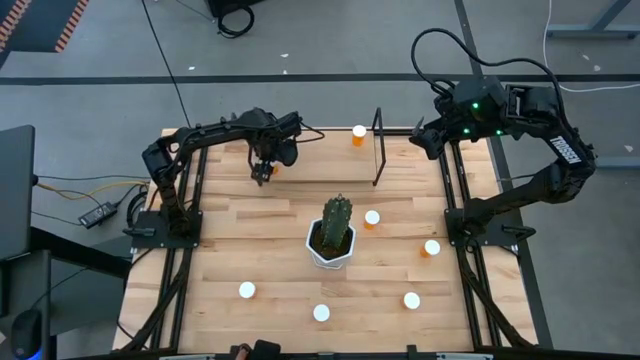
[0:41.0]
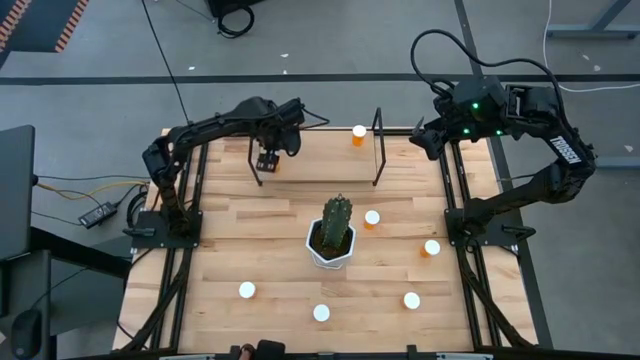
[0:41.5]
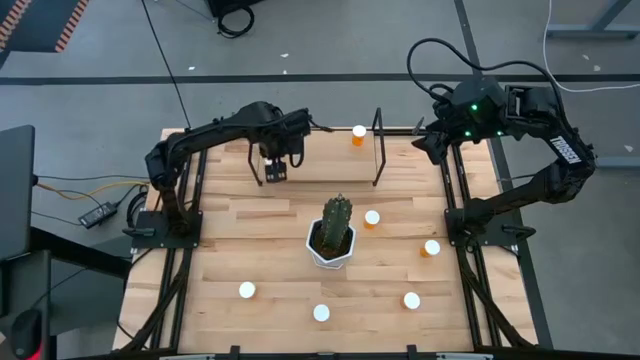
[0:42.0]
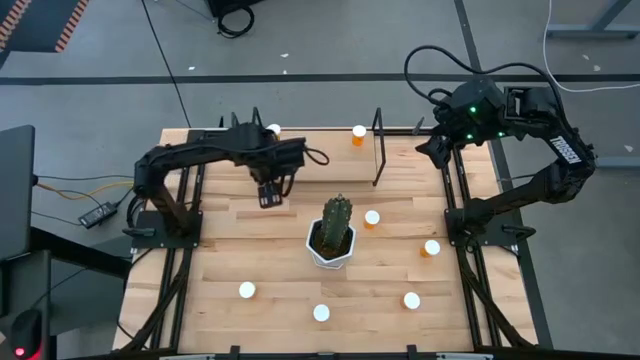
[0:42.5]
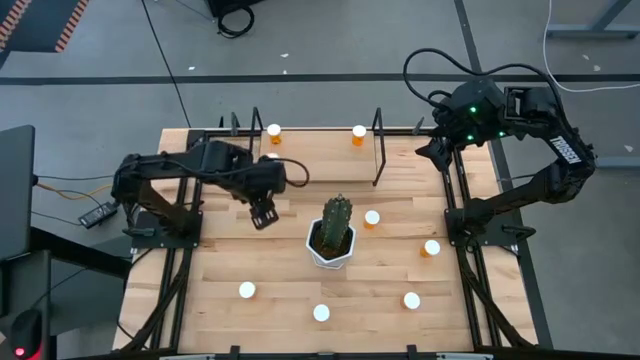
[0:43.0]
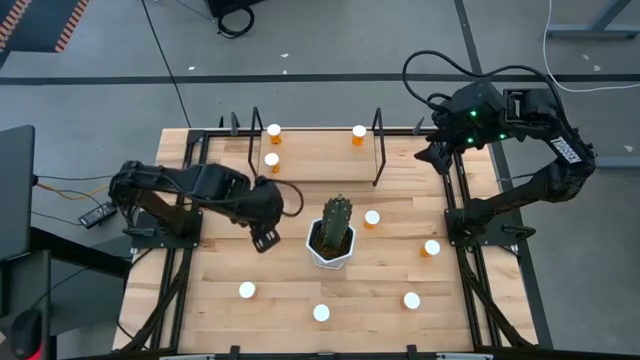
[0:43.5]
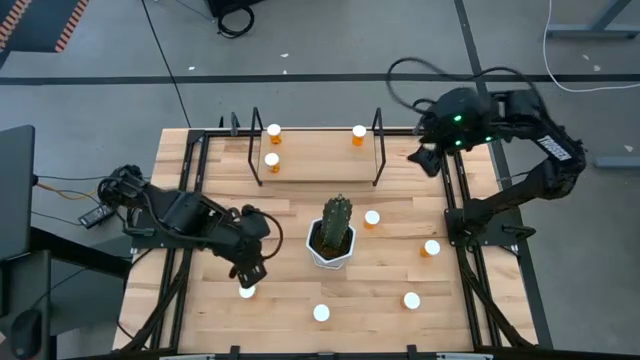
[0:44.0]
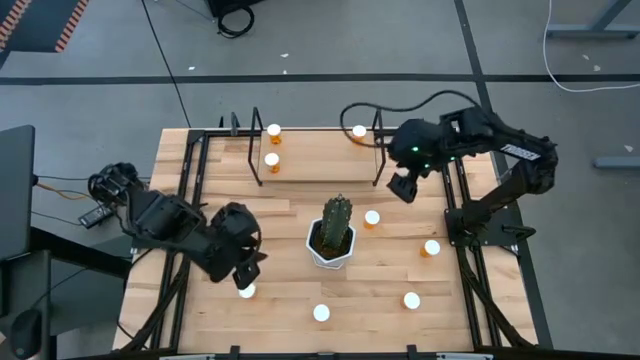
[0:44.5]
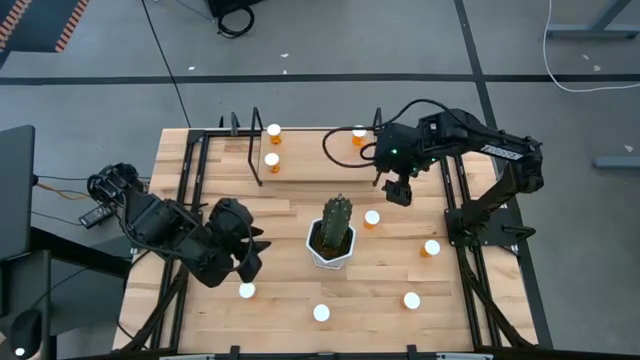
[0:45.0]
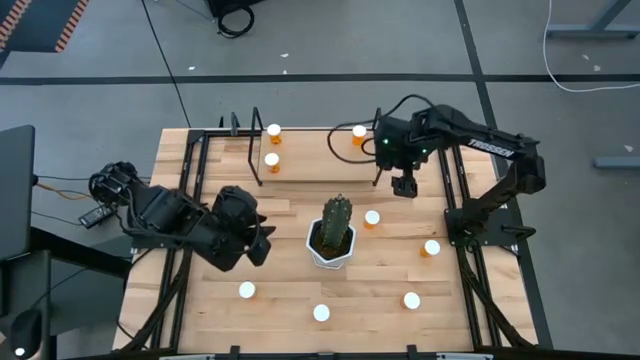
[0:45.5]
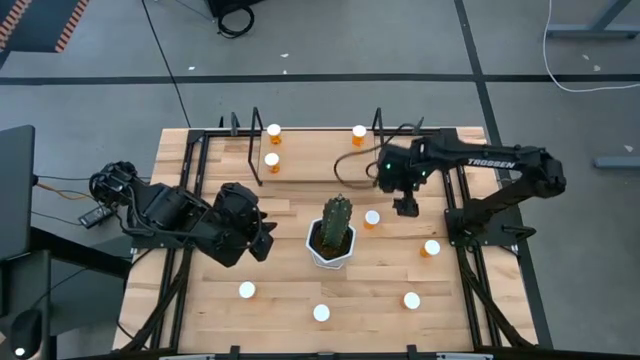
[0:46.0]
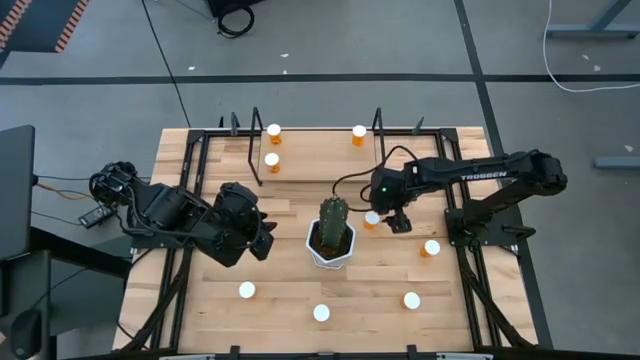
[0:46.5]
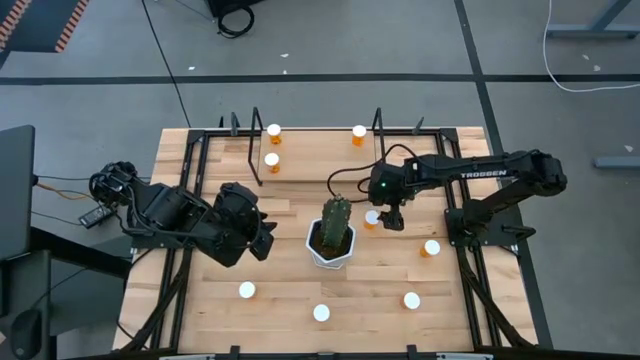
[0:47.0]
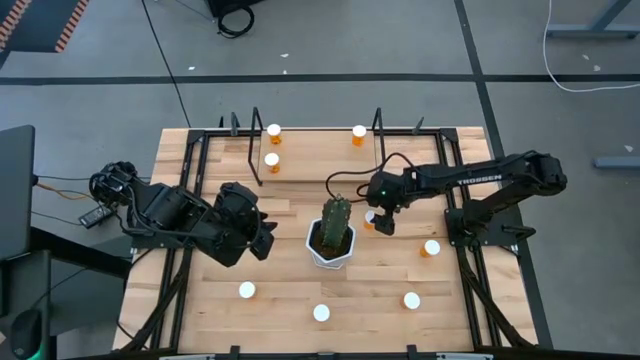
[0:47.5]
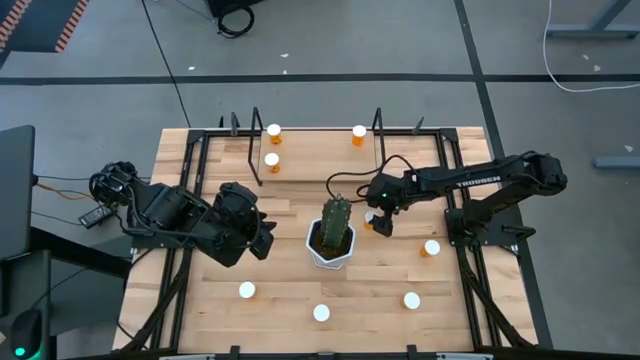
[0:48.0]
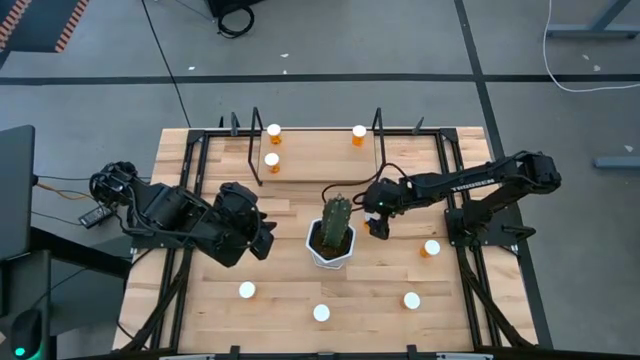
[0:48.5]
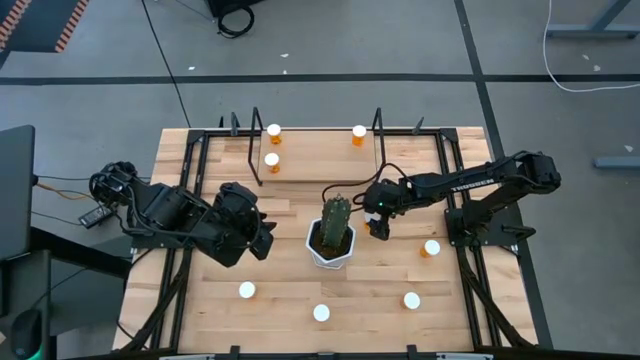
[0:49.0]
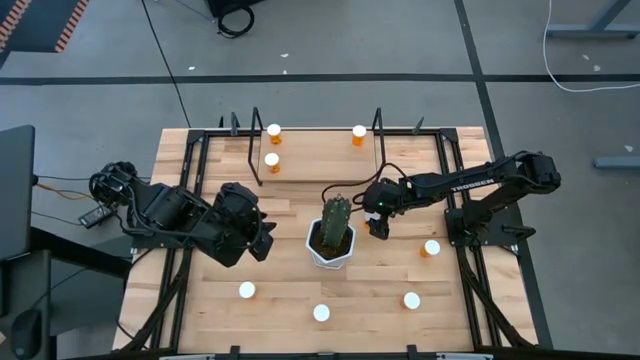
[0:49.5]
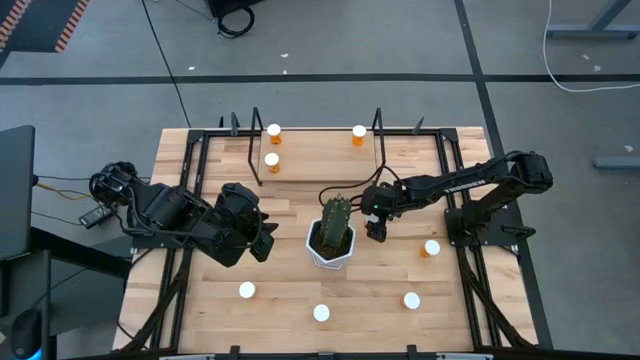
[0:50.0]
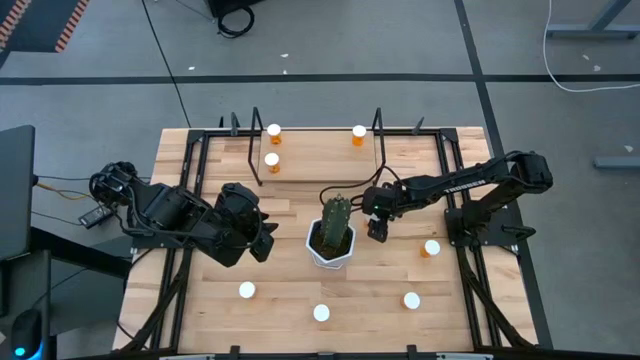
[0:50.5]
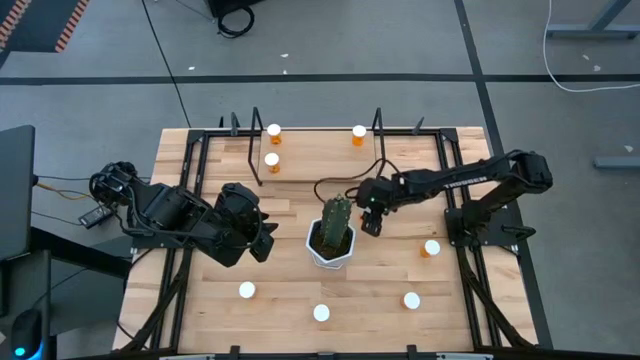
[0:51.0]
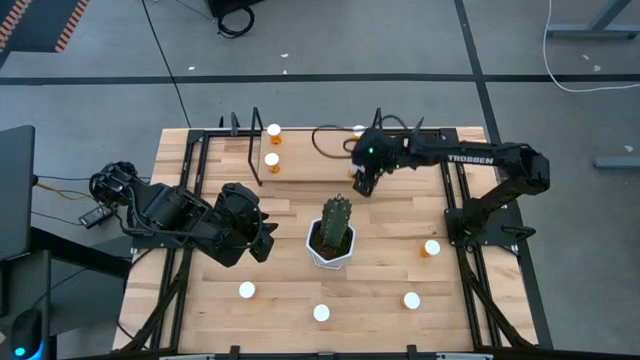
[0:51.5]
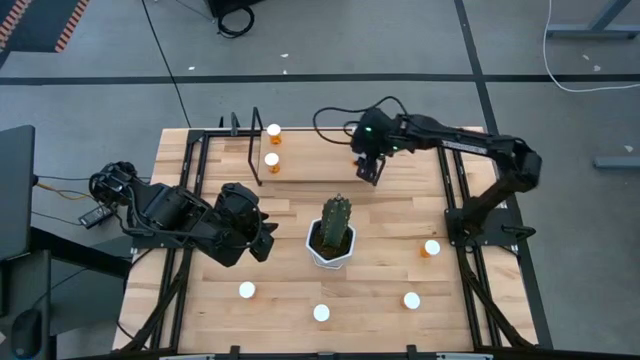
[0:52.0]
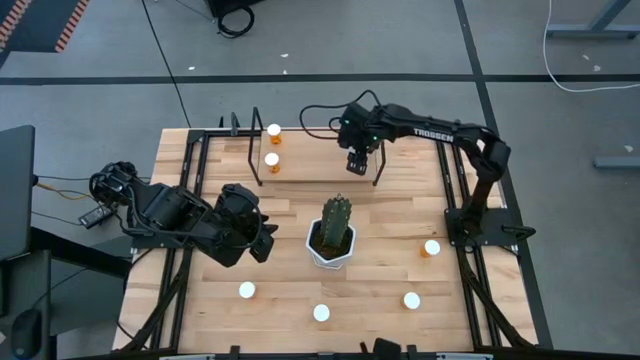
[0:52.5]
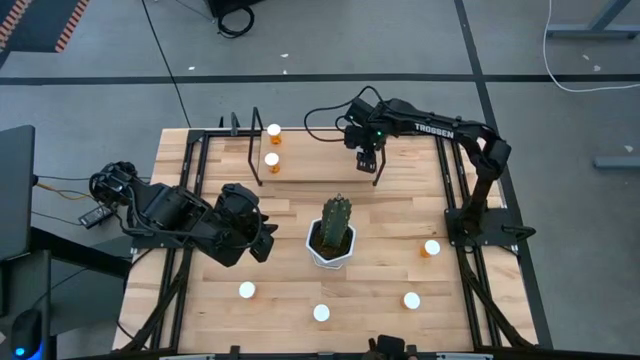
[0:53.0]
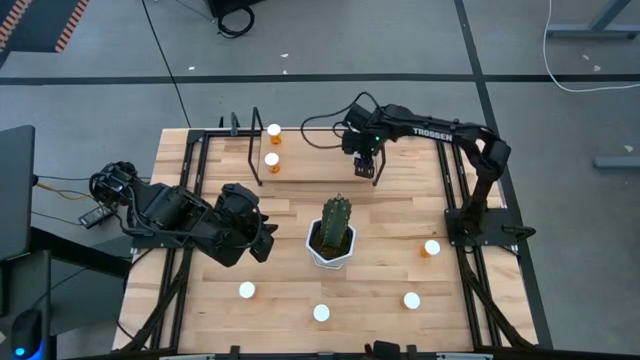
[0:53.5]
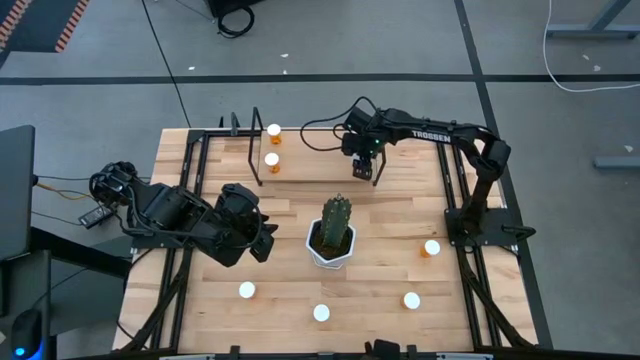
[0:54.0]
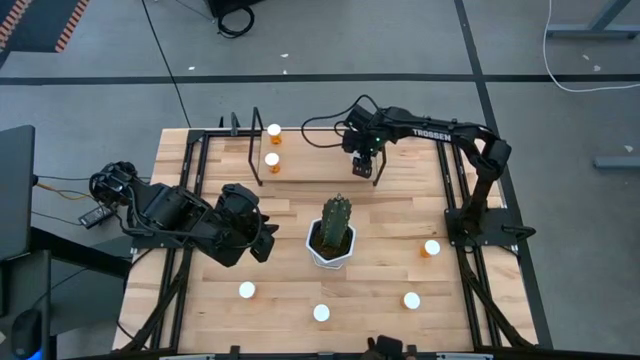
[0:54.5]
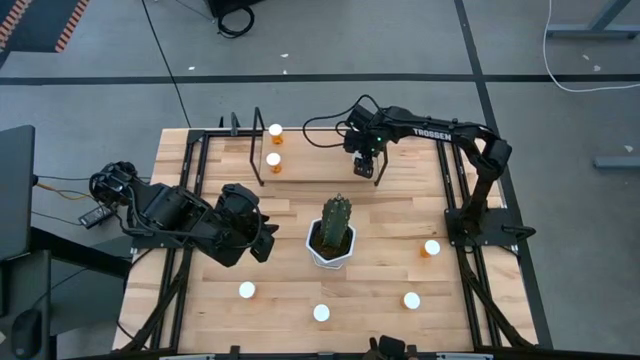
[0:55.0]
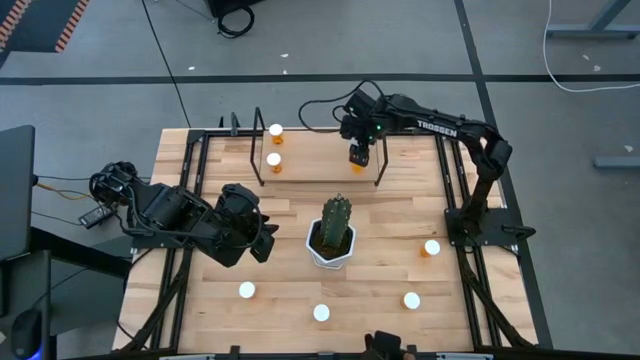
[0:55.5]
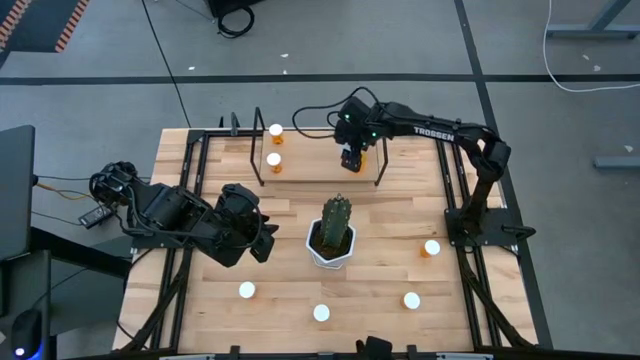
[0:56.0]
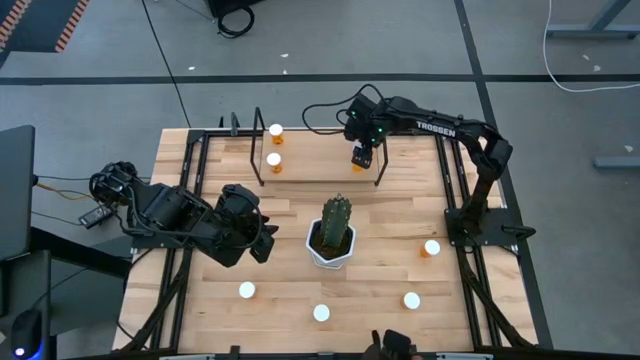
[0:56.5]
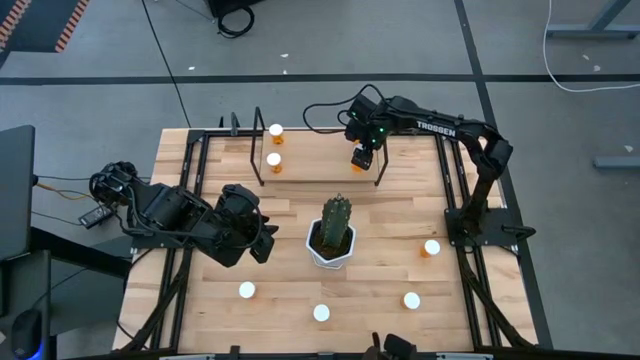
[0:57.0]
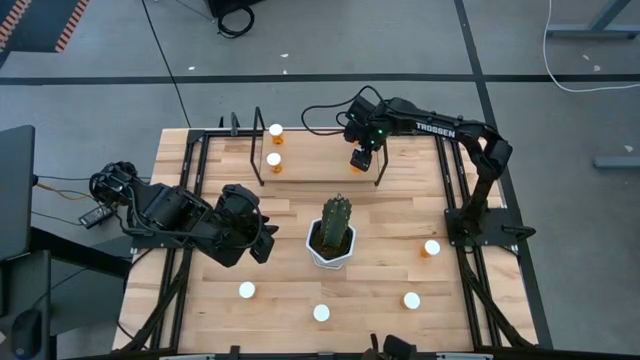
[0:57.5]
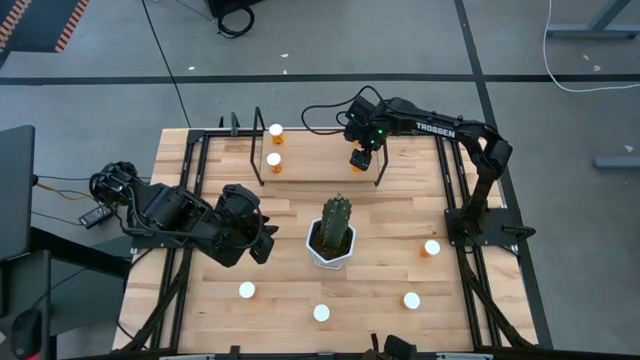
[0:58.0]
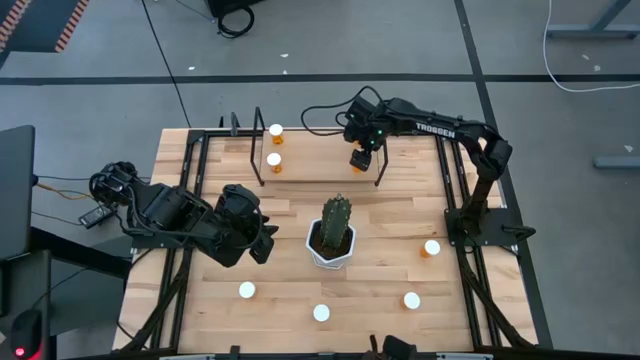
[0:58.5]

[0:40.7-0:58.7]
Task: Pick and place medicine bottles onto shelf by color
Put the orange medicine bottle on the shelf

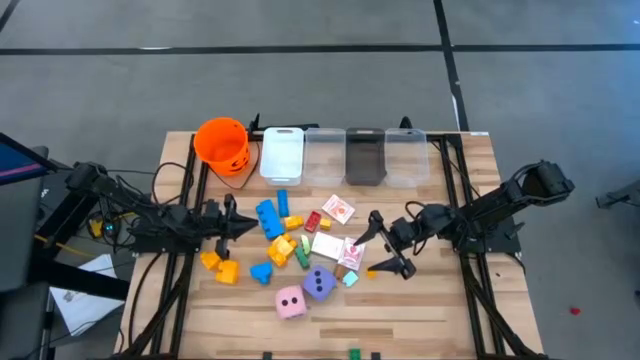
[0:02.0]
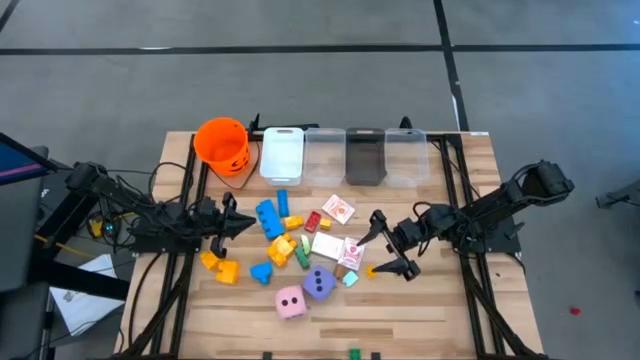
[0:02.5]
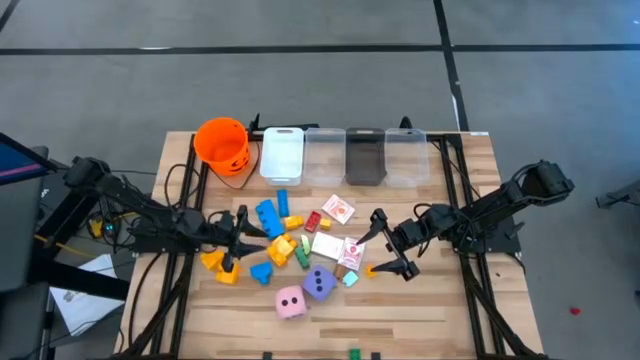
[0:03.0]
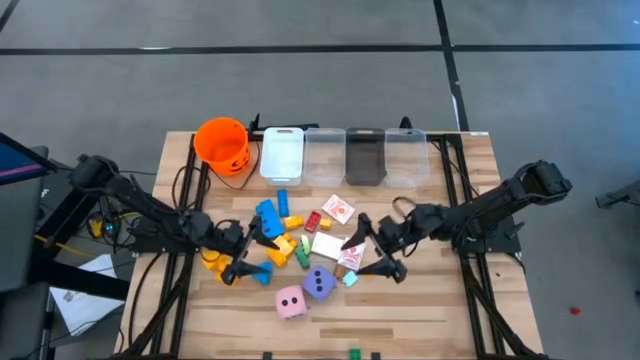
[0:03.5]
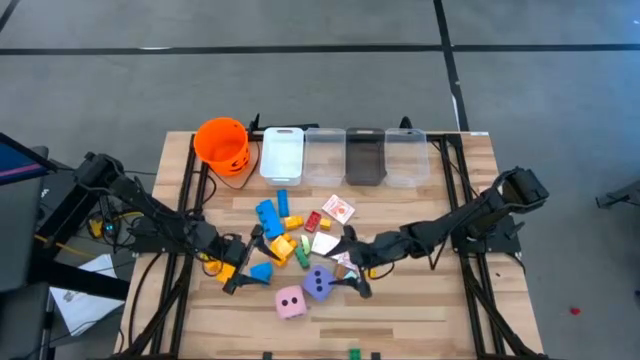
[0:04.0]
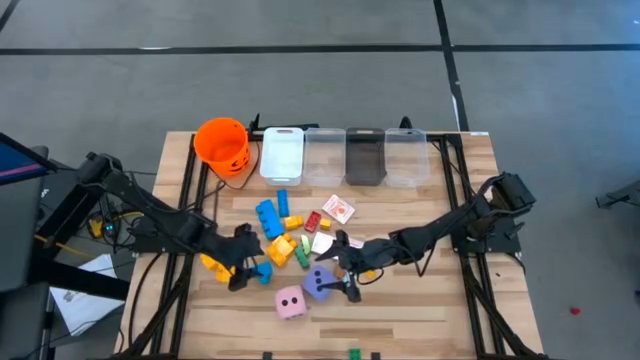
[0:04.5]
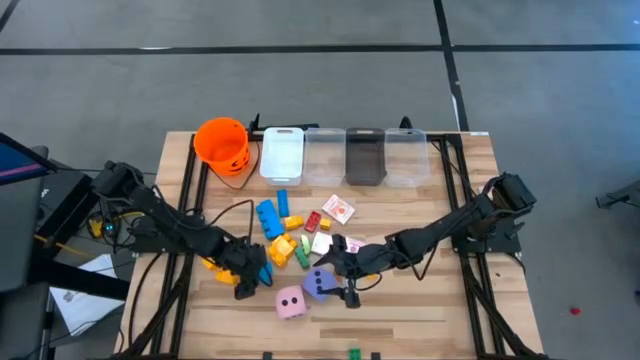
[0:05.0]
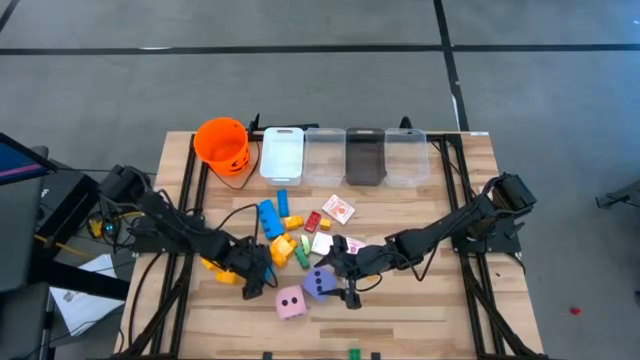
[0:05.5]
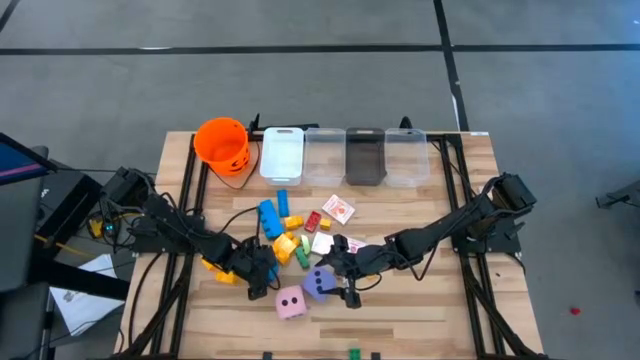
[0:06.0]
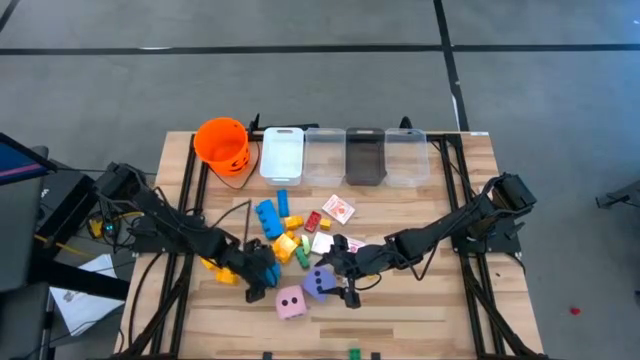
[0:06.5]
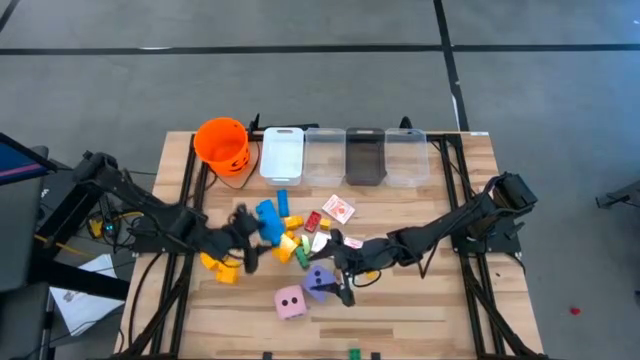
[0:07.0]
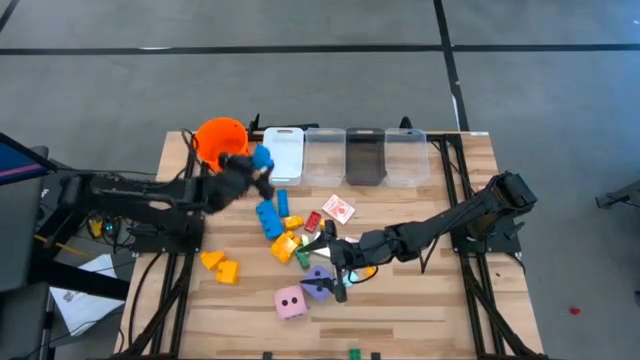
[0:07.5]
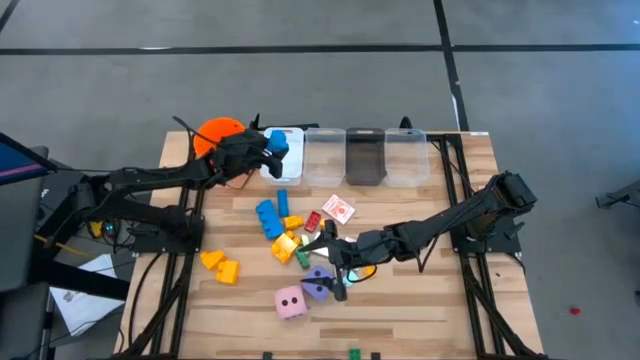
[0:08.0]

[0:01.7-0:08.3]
Task: Pick & Place Toys
Put the bottom big blue game piece into the white bin
